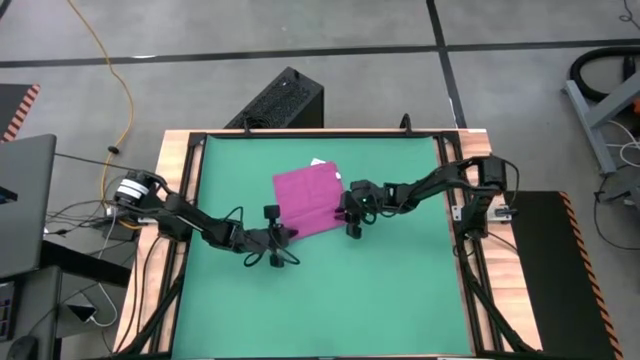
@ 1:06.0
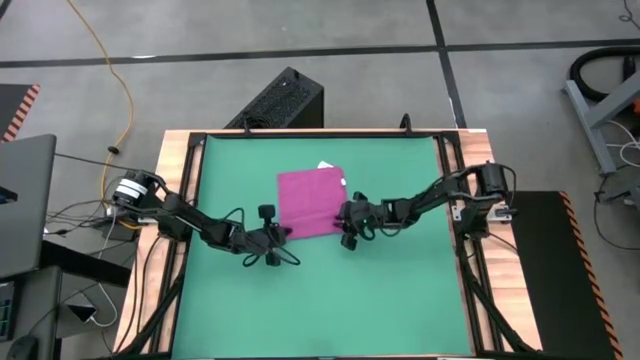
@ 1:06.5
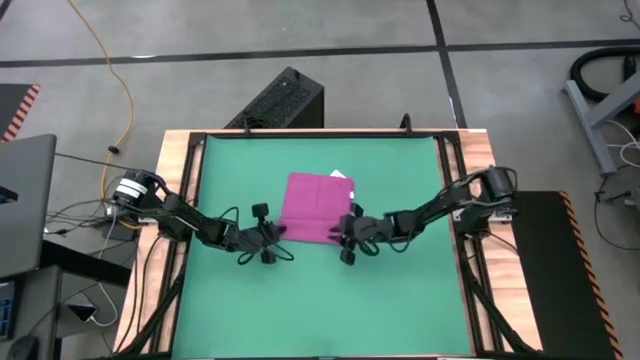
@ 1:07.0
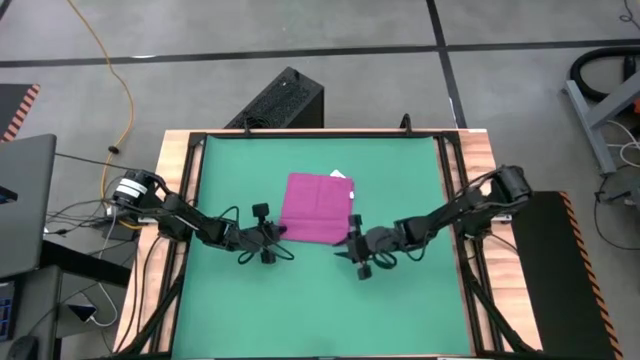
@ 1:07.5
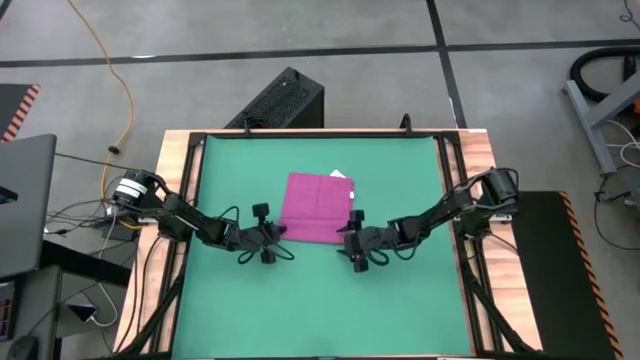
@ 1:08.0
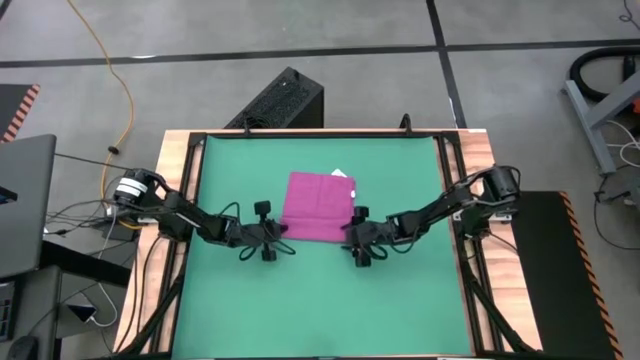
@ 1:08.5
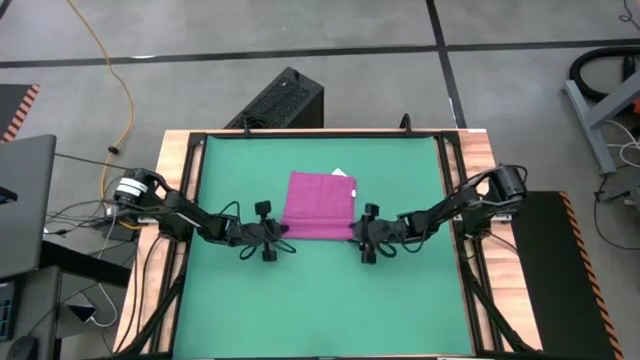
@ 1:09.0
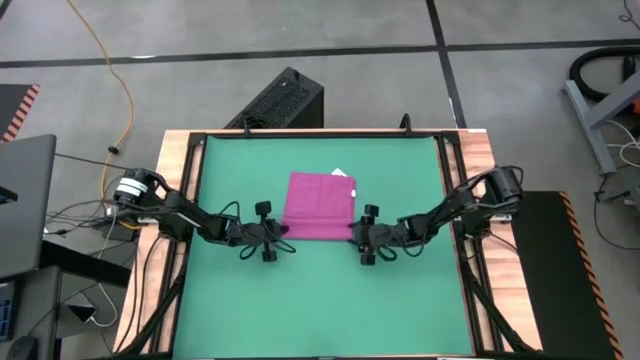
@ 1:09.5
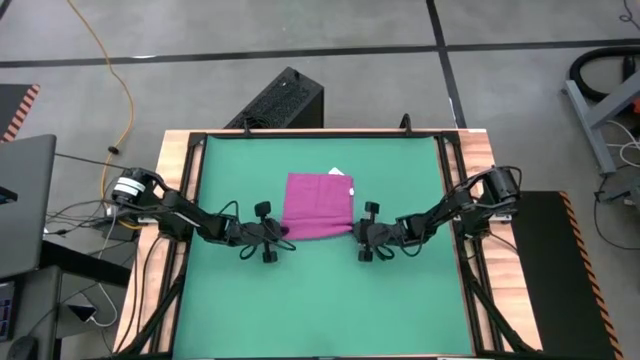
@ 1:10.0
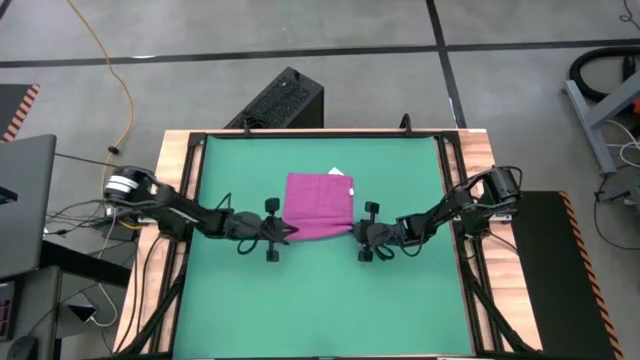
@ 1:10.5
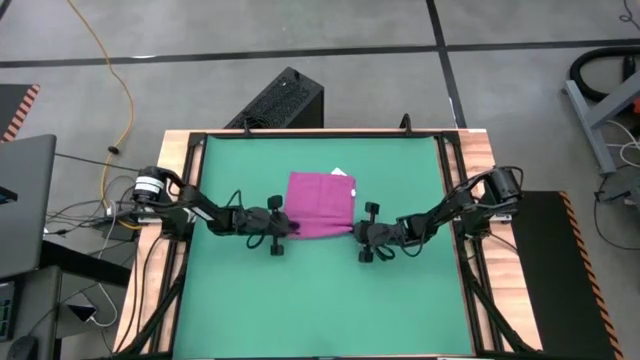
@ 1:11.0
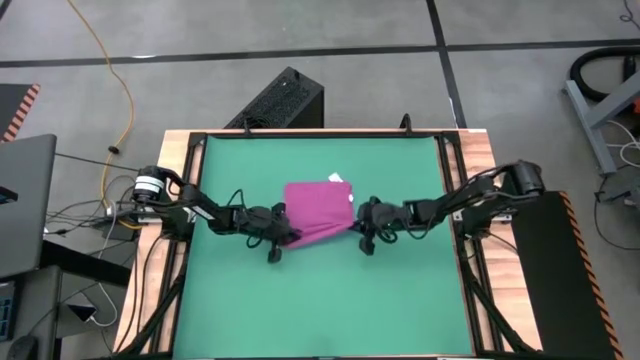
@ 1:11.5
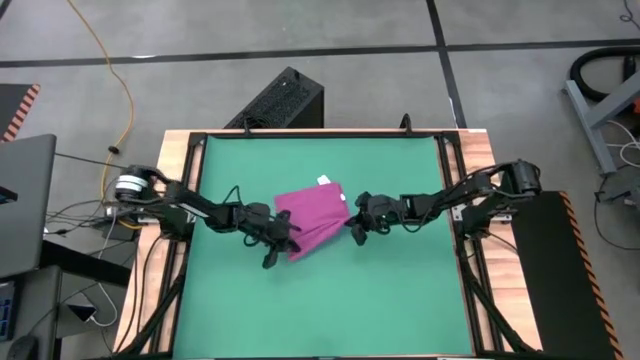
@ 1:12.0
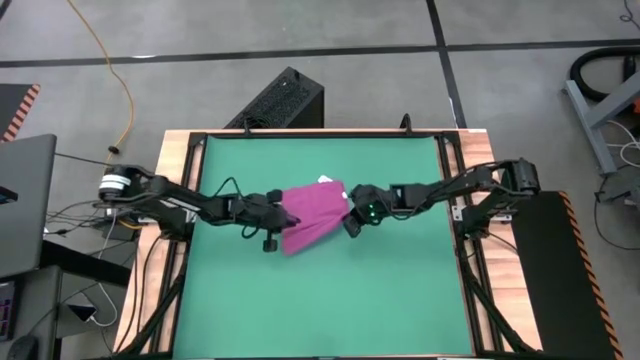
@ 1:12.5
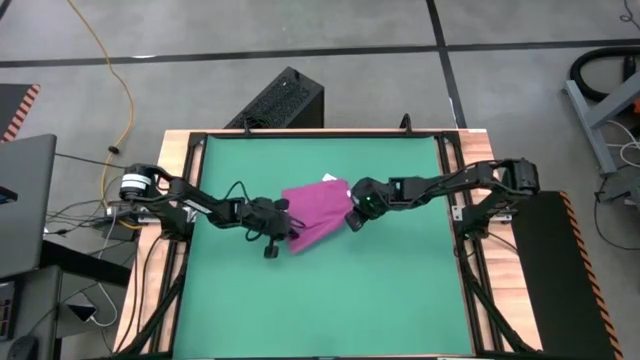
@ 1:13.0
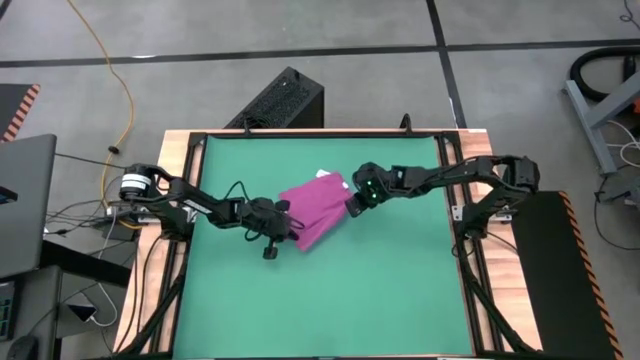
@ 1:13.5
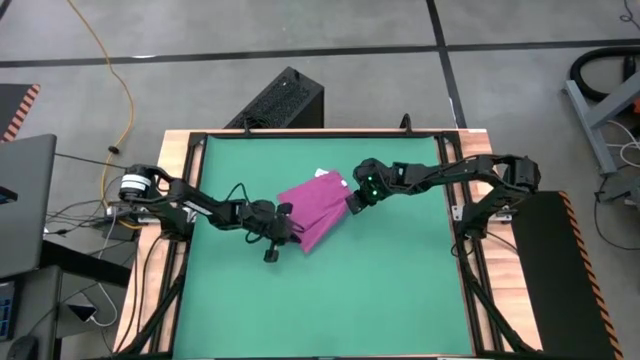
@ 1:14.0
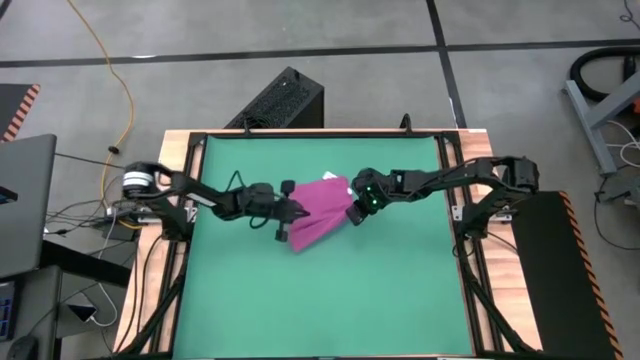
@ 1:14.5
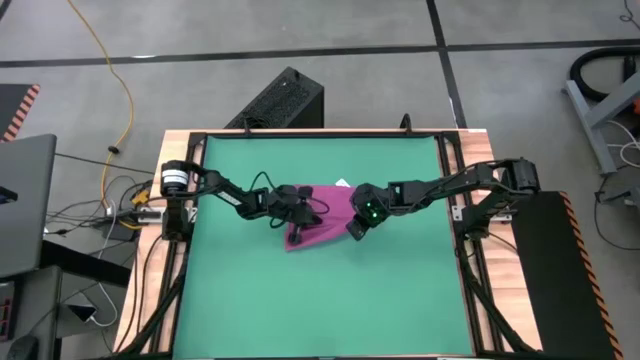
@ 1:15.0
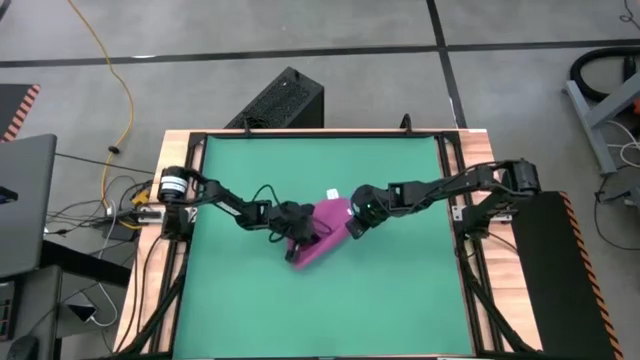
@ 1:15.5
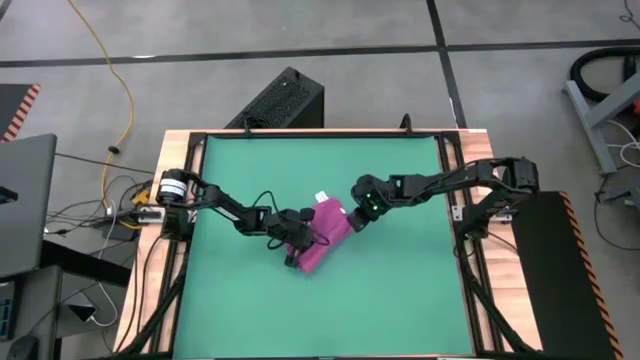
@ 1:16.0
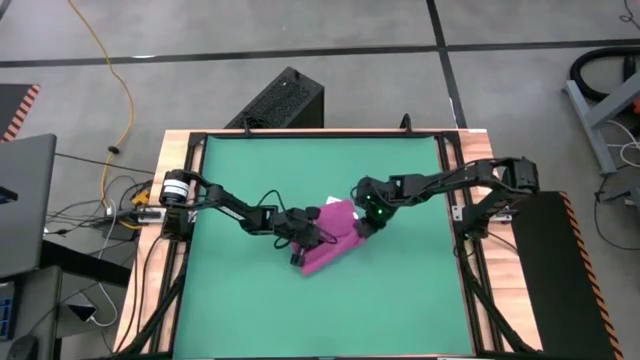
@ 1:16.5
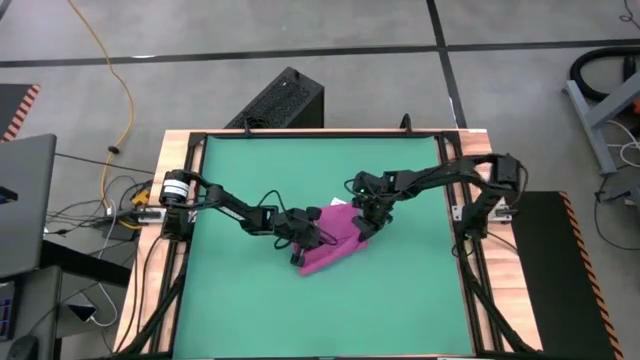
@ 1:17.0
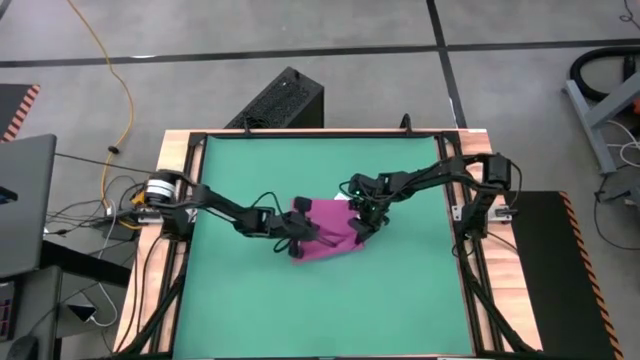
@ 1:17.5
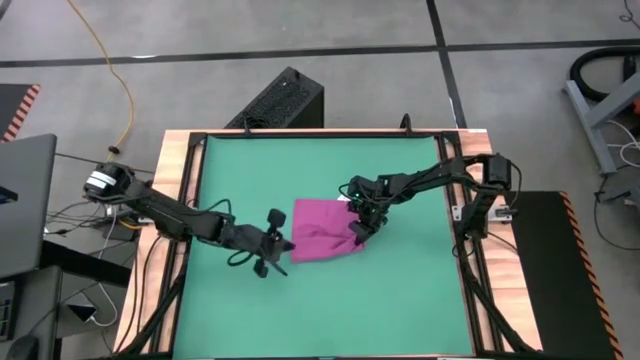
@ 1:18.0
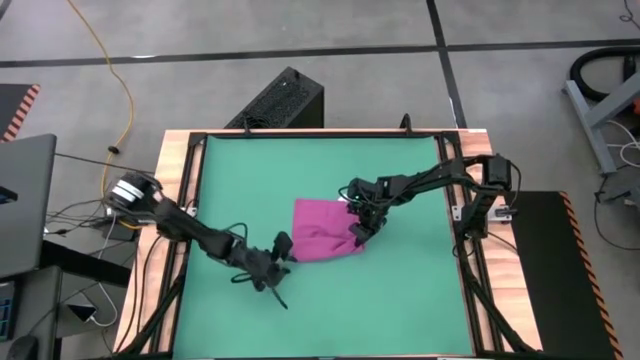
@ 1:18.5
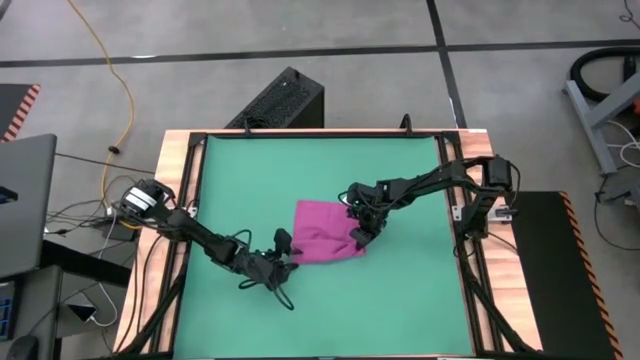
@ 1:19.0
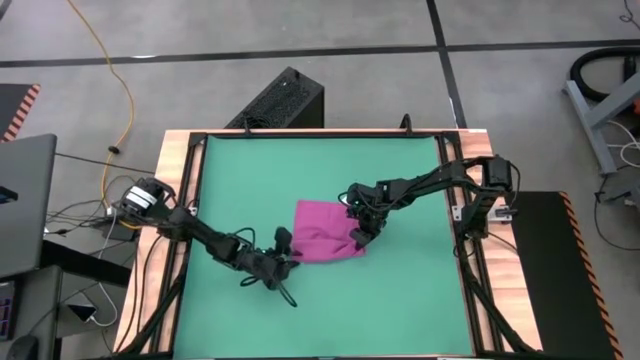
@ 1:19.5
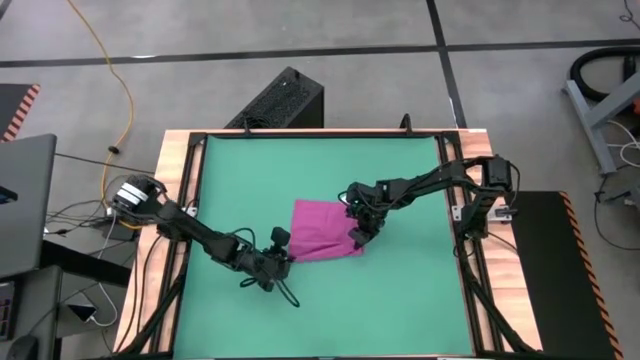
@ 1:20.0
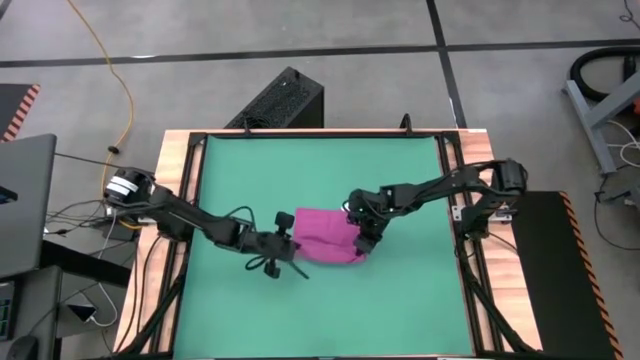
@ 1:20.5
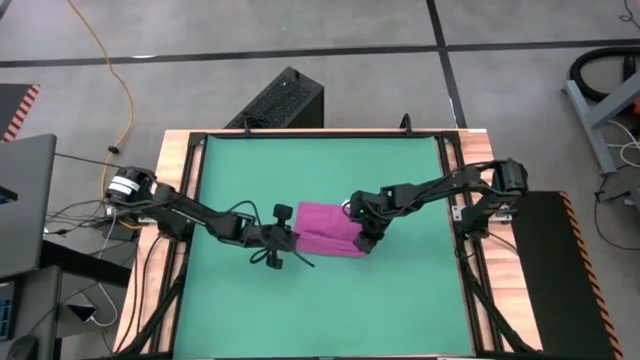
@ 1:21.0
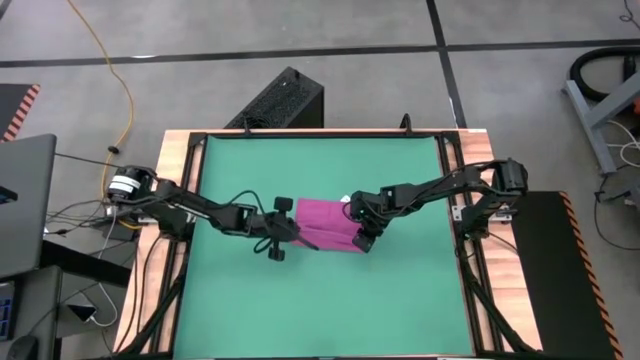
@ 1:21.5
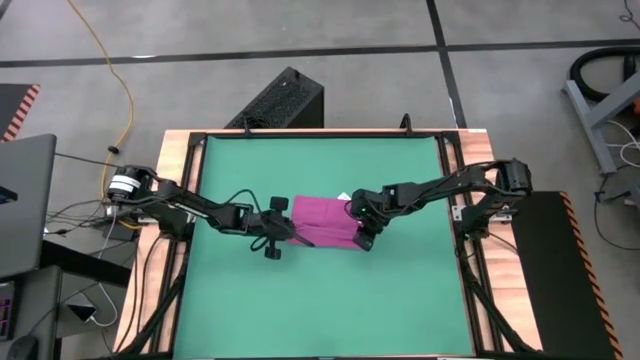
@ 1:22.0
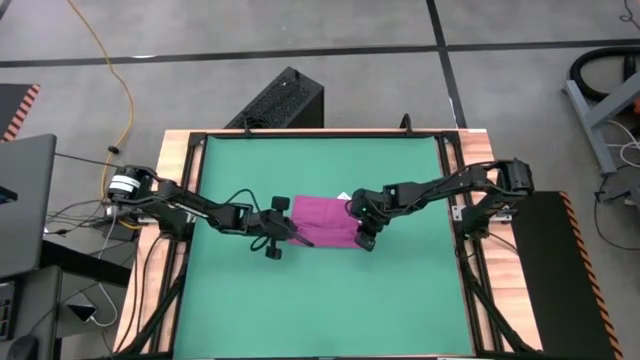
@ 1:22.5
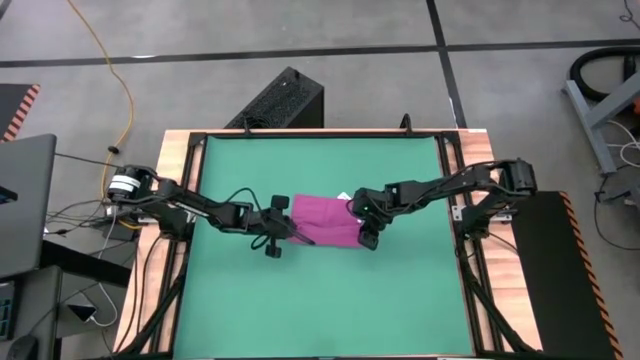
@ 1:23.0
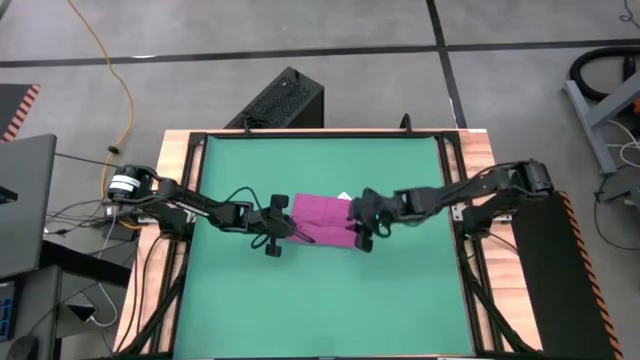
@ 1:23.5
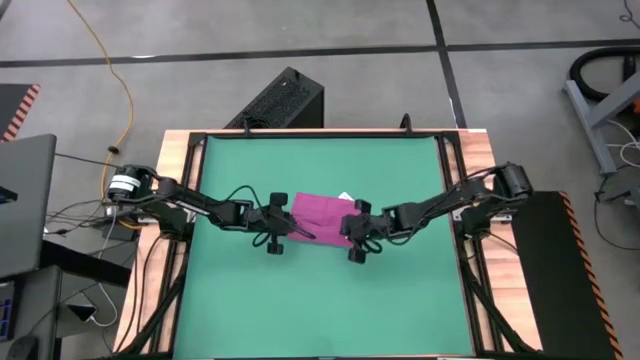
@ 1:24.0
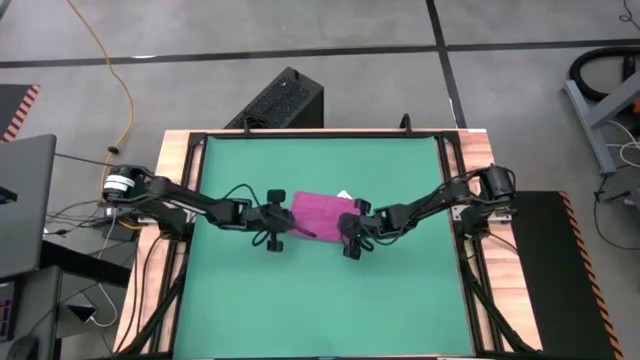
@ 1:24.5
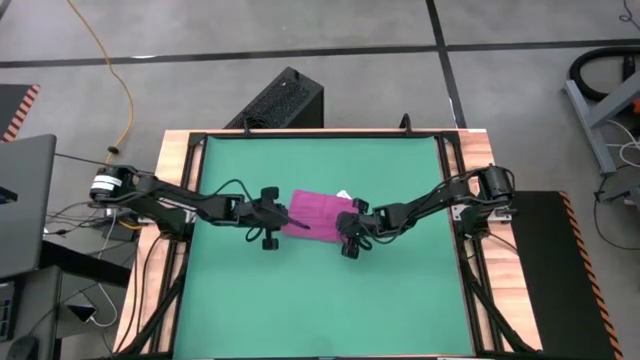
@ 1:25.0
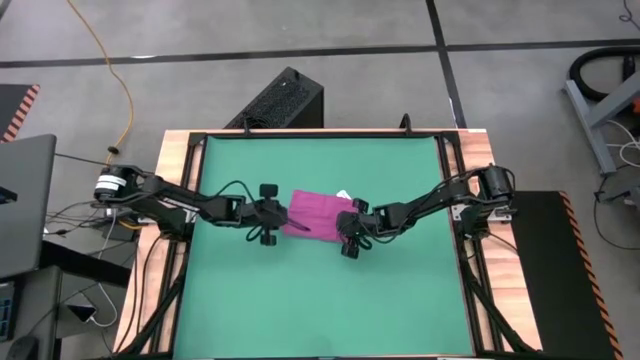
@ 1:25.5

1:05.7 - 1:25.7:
Task: Roll towel into tight, uniform cylinder
Roll the pink towel
